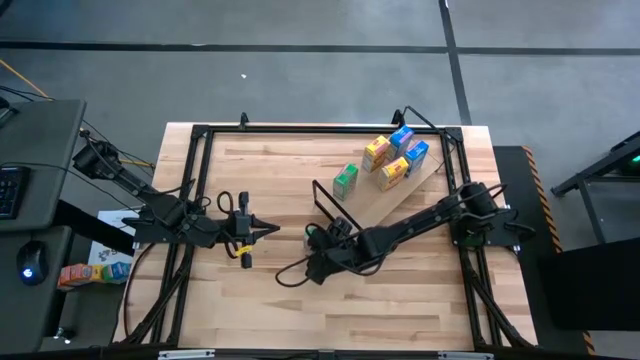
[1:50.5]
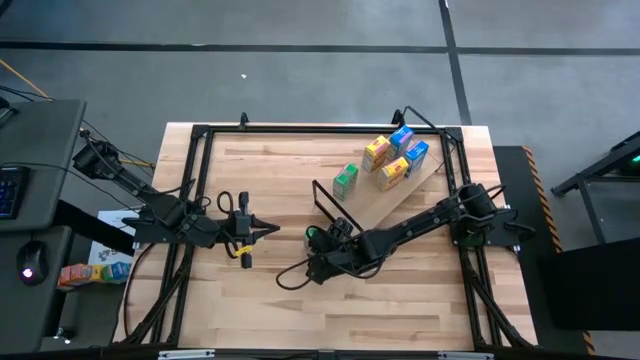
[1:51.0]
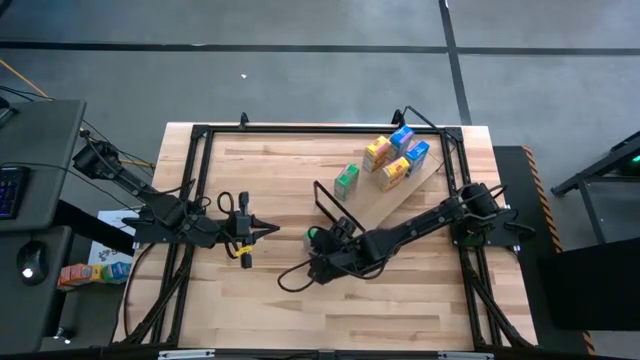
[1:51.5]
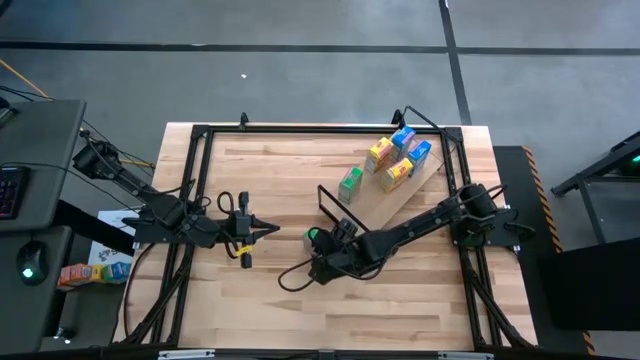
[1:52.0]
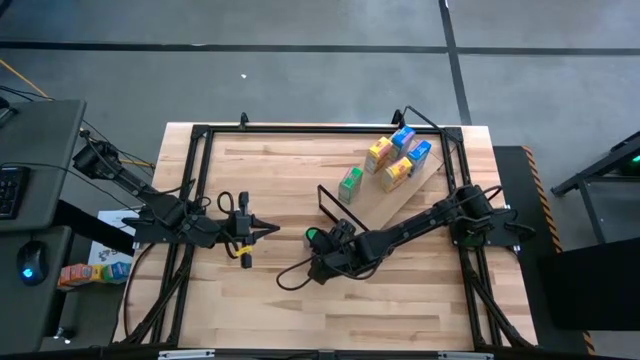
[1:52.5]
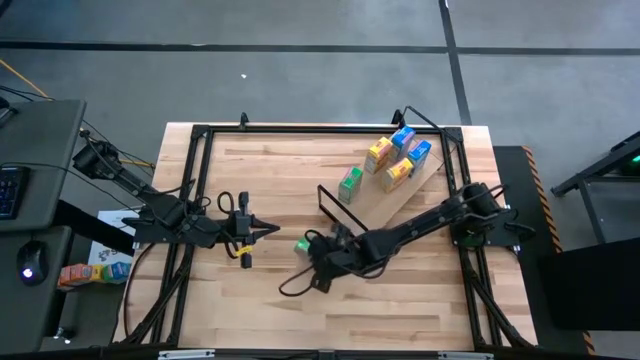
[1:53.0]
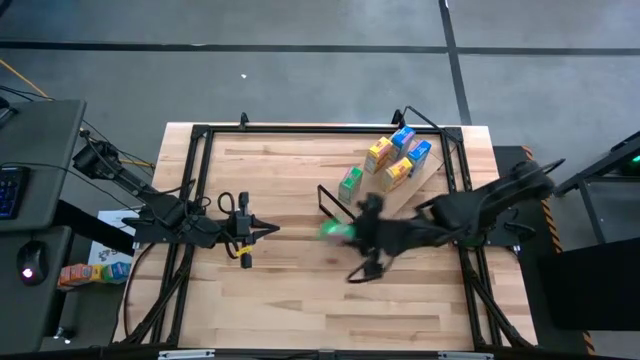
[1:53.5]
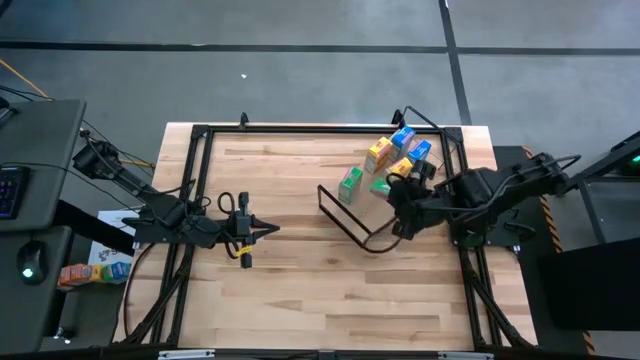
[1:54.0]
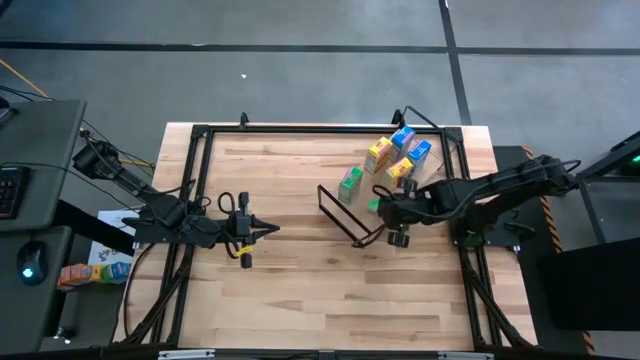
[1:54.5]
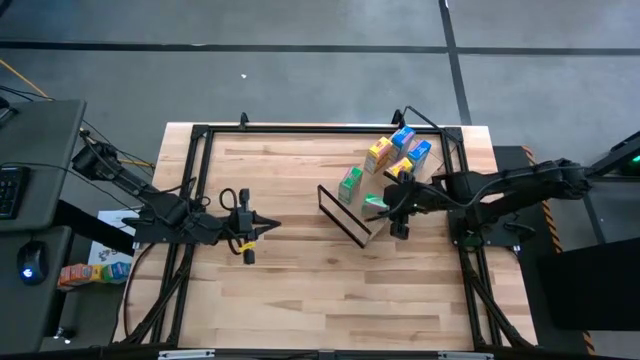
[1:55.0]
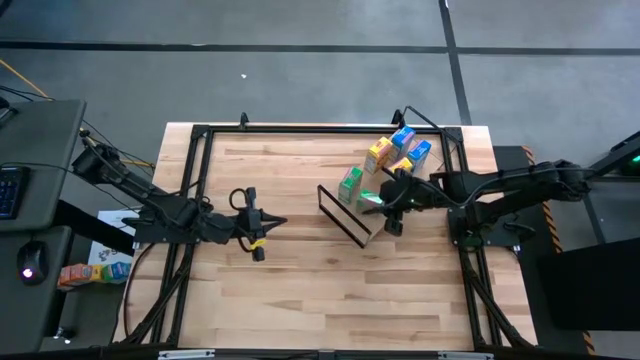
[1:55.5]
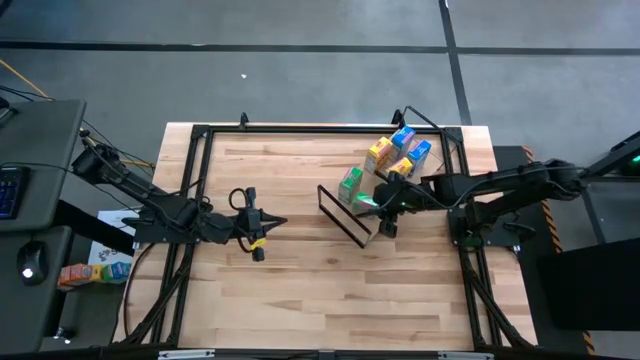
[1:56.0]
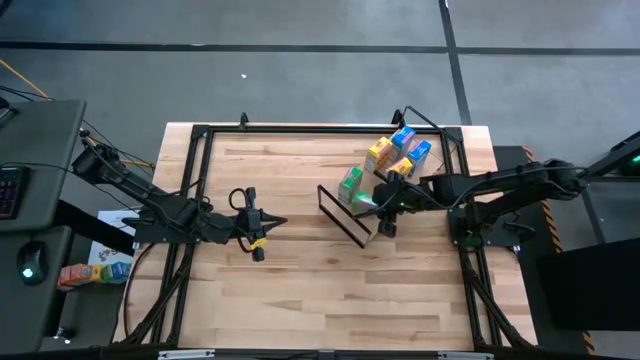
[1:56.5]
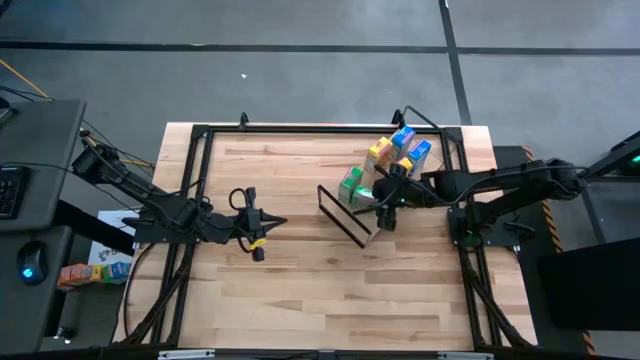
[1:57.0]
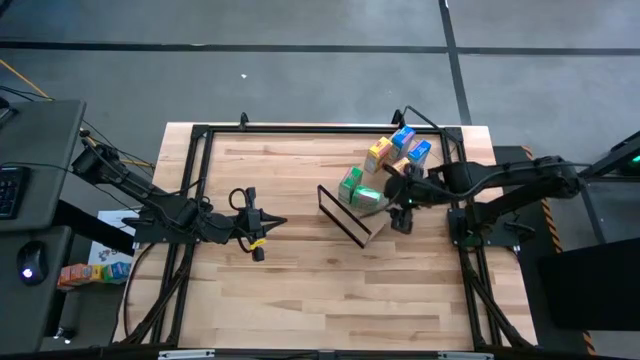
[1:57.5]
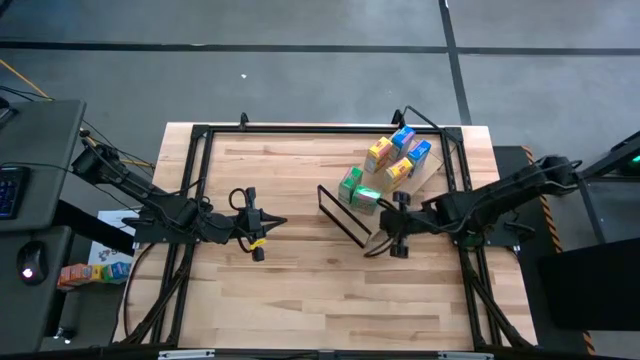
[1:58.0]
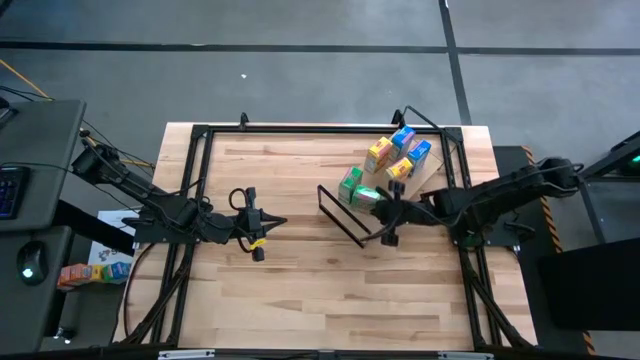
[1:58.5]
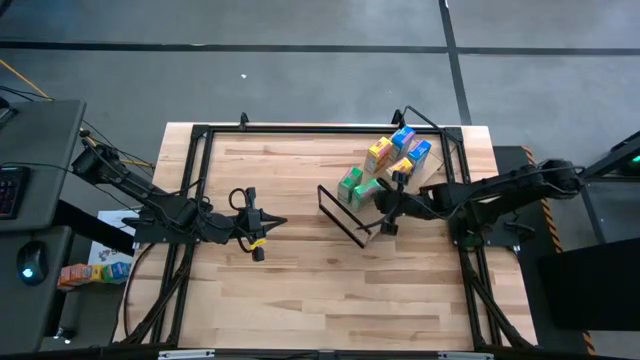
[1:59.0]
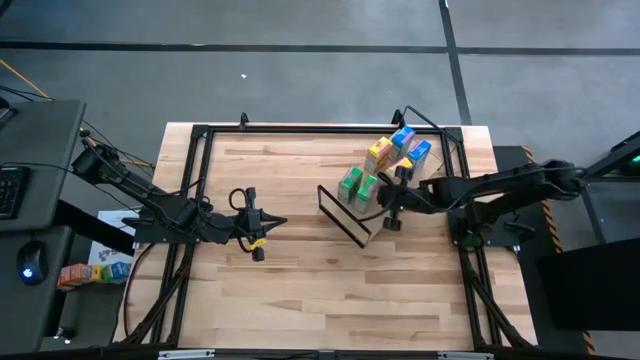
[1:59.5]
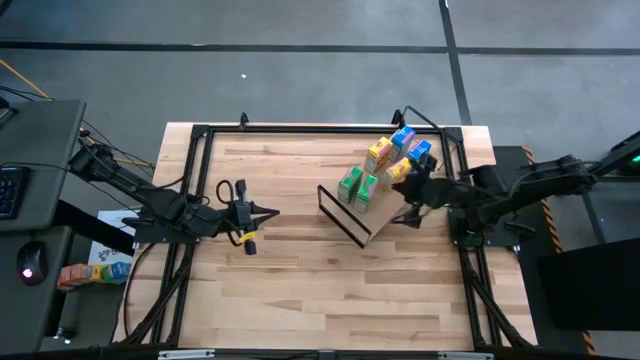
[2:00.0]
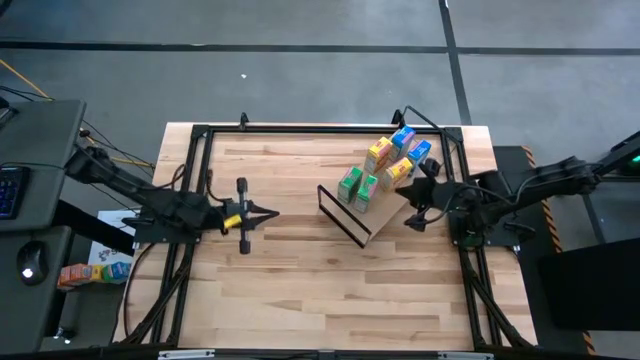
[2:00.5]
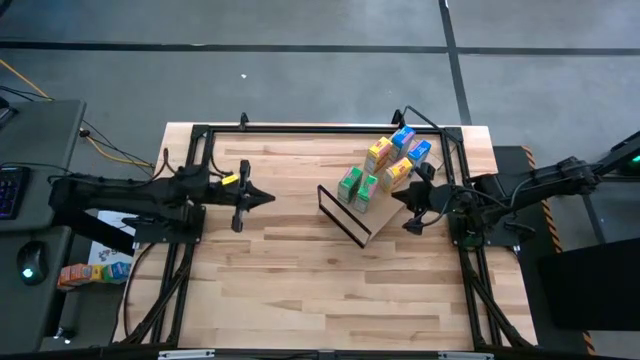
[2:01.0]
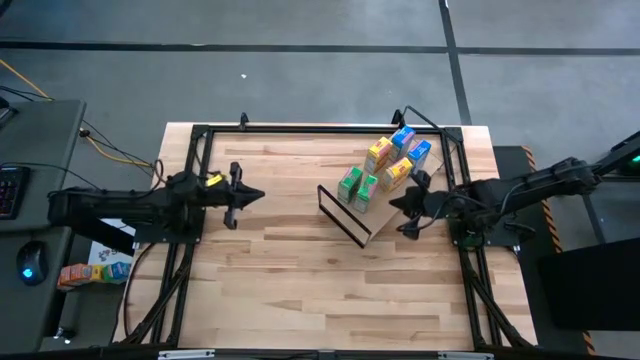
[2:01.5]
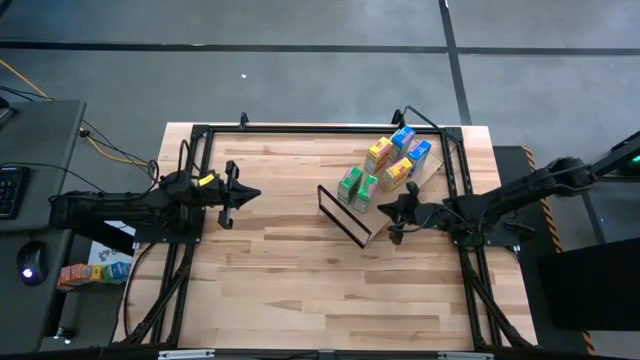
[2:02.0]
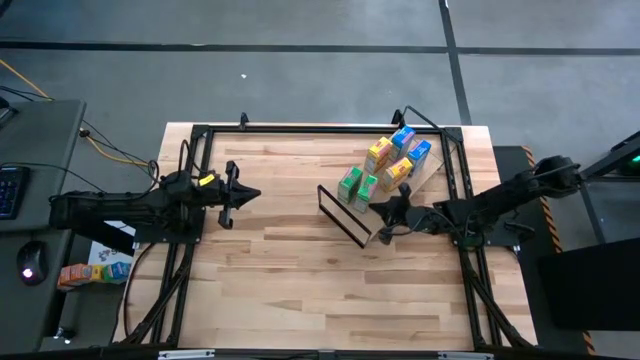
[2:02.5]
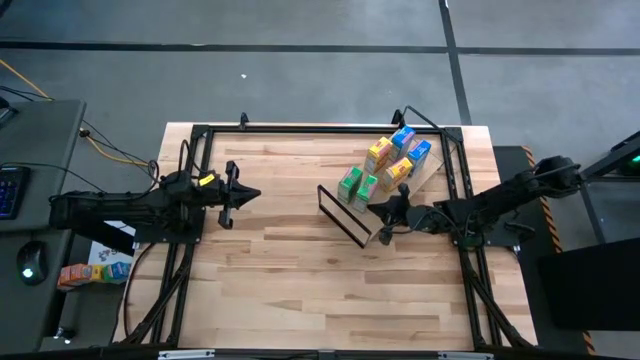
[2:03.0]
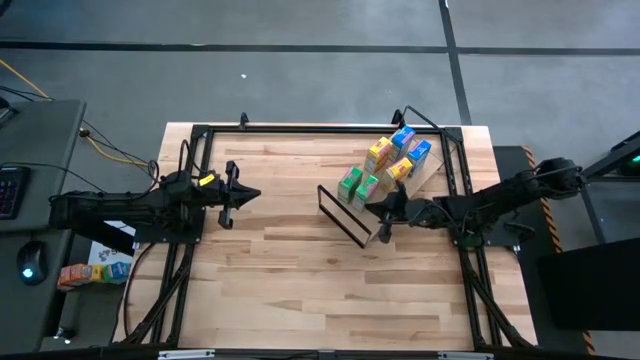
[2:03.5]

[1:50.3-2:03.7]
Task: Stack cereal on shelf
Put the green cereal box on the shelf aligned with the green cereal box

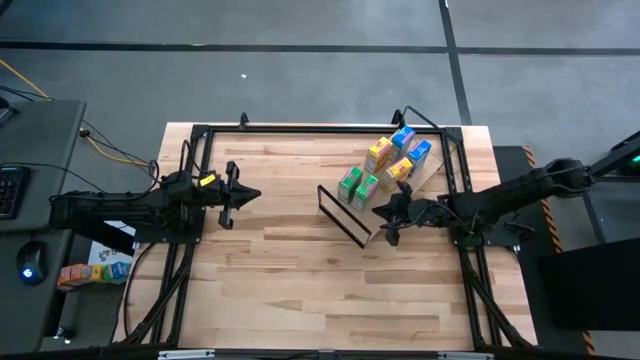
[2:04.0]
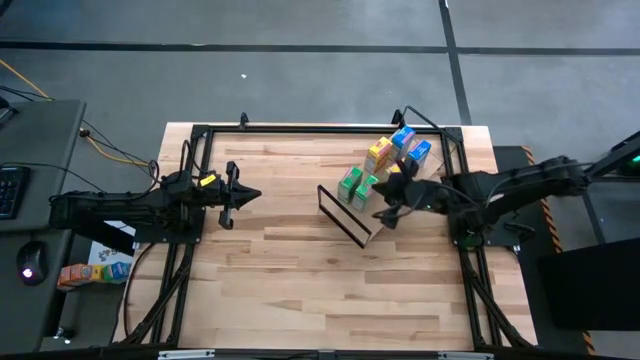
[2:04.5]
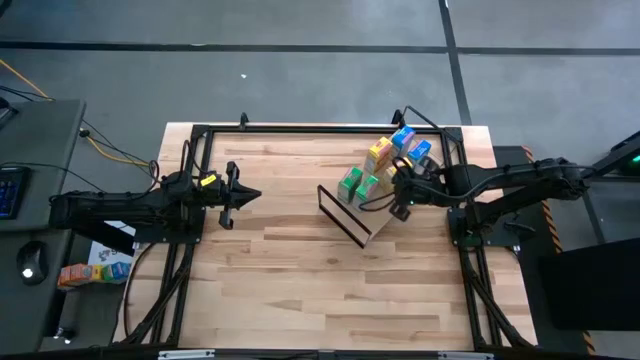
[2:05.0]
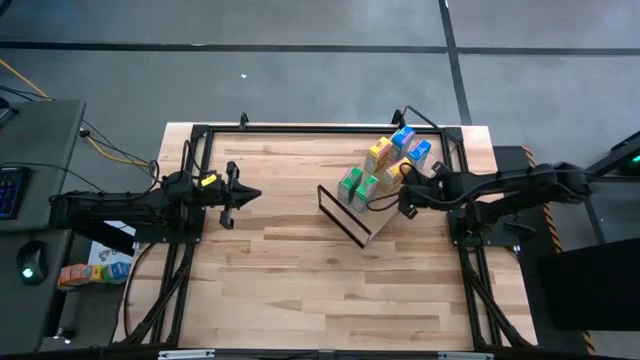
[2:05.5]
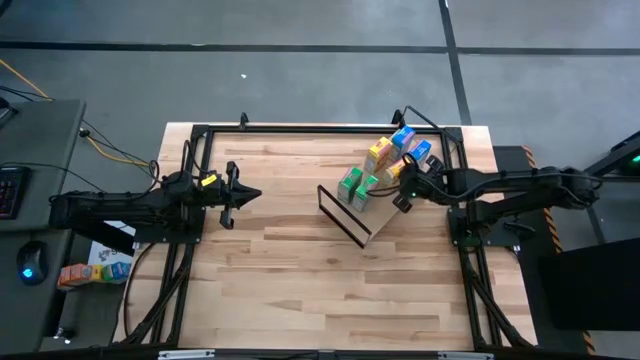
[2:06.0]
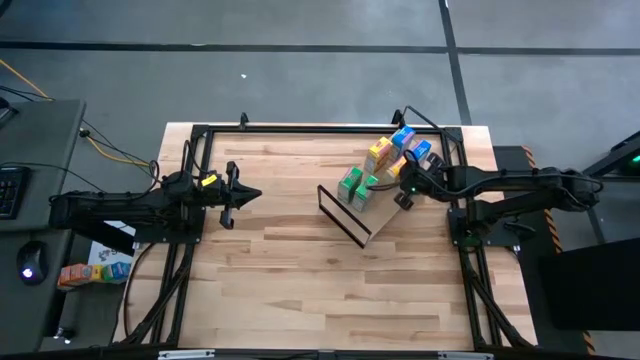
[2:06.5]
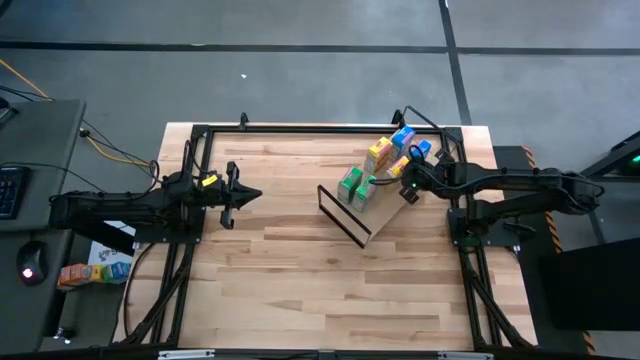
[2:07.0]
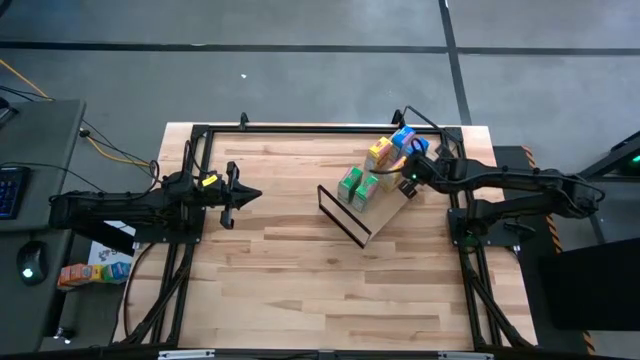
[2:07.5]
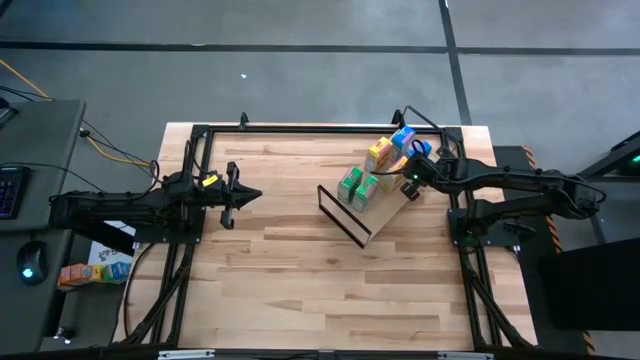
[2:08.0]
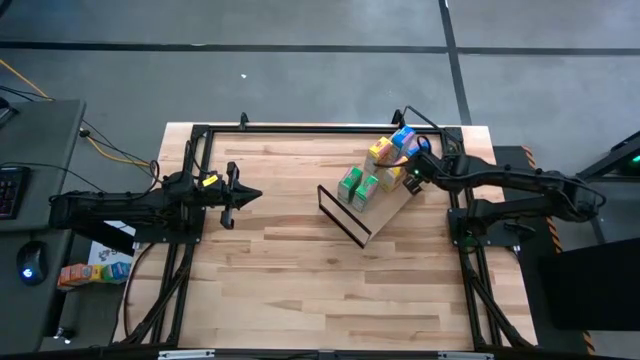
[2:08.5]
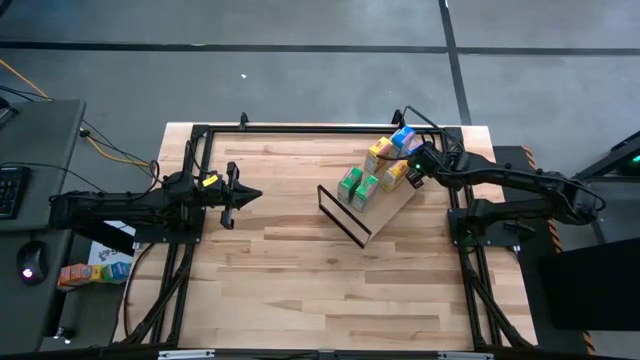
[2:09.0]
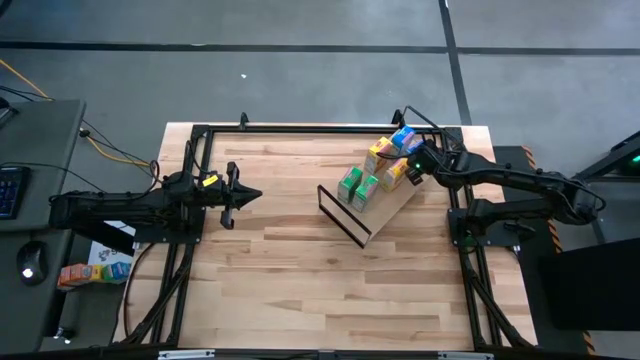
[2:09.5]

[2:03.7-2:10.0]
Adjust the stock cereal boxes on the shelf

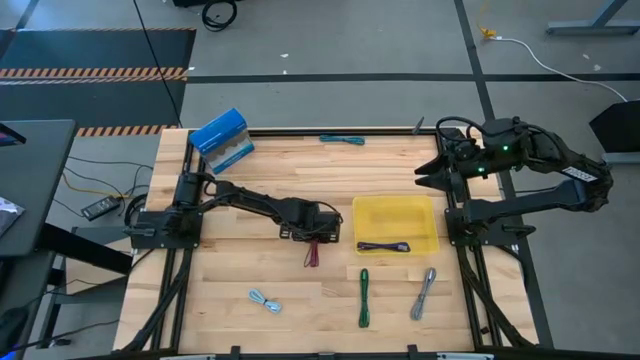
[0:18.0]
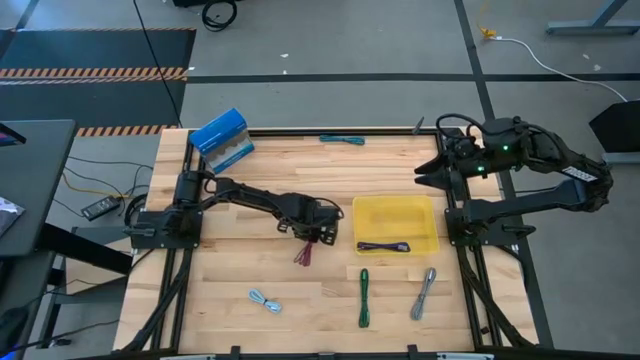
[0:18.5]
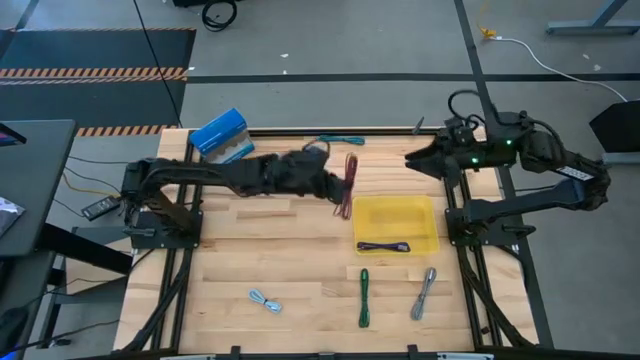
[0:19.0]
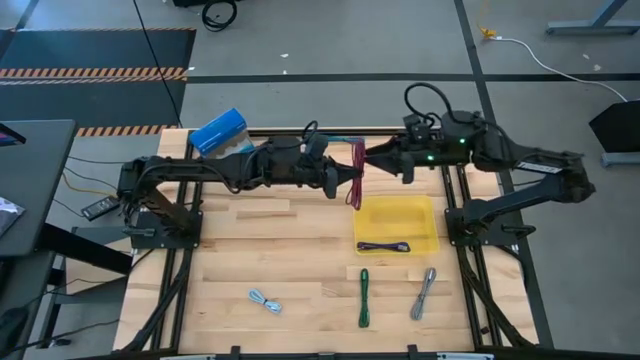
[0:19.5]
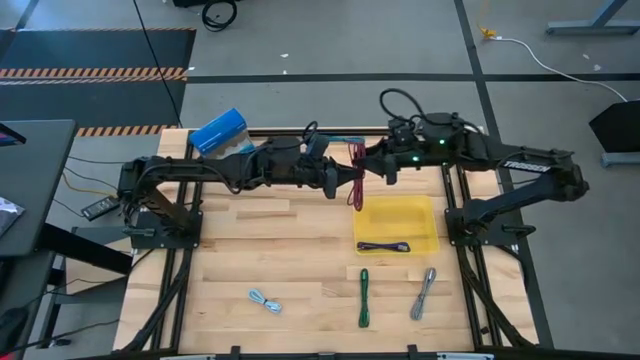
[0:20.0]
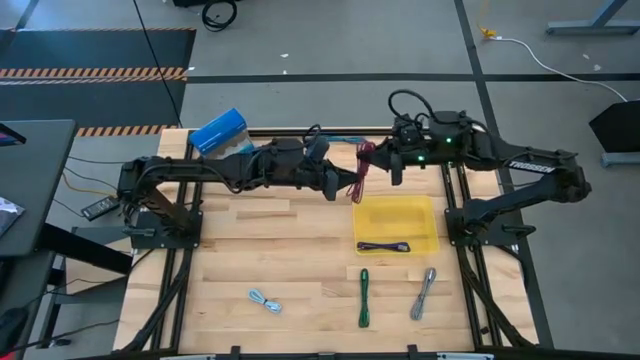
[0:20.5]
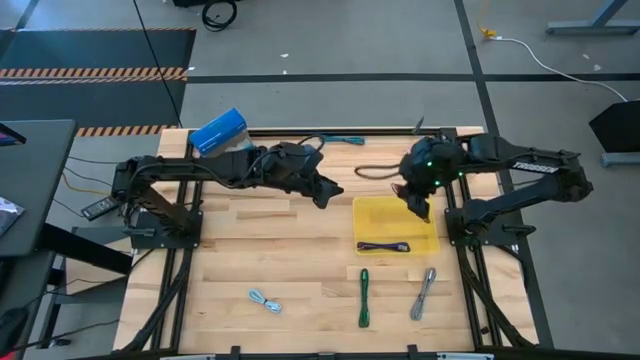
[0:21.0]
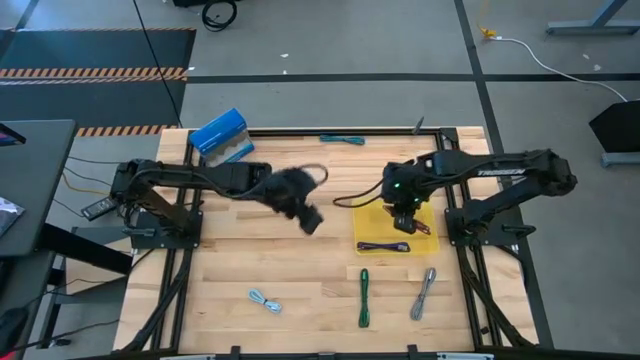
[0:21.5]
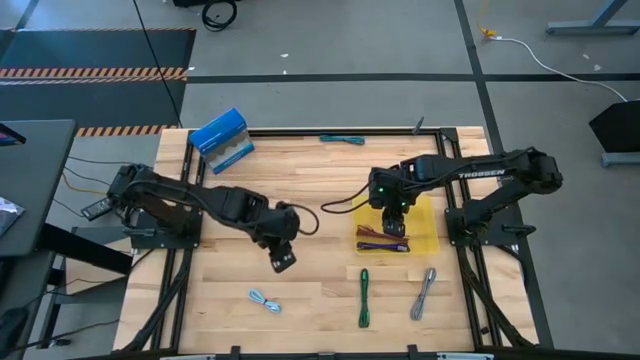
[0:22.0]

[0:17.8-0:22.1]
Task: Pick and place USB-C Cables
Put the pink charger cable into the yellow bin
